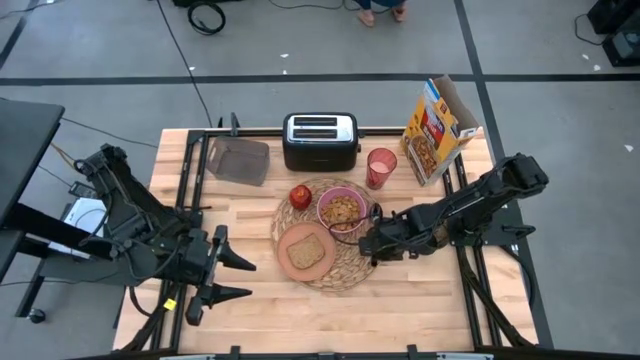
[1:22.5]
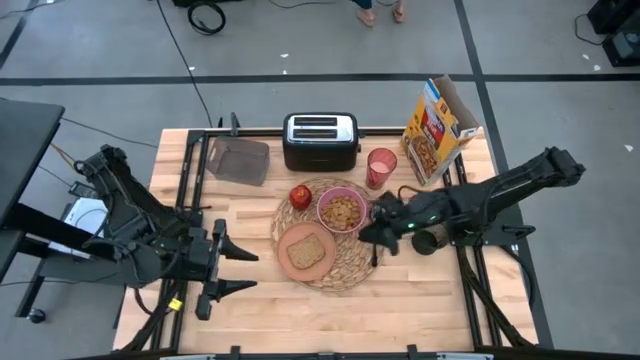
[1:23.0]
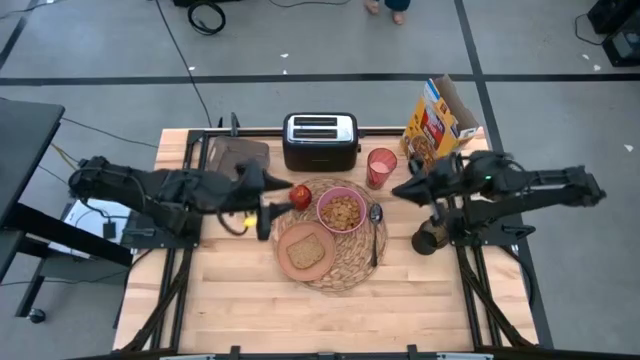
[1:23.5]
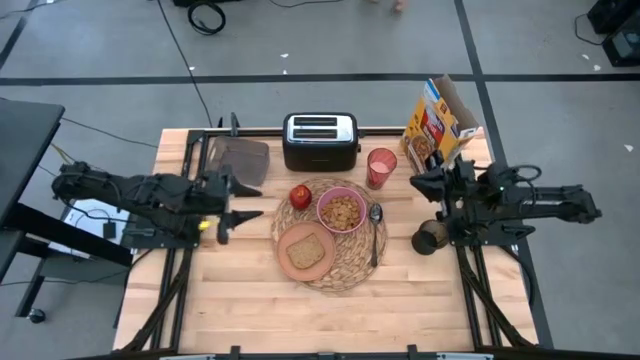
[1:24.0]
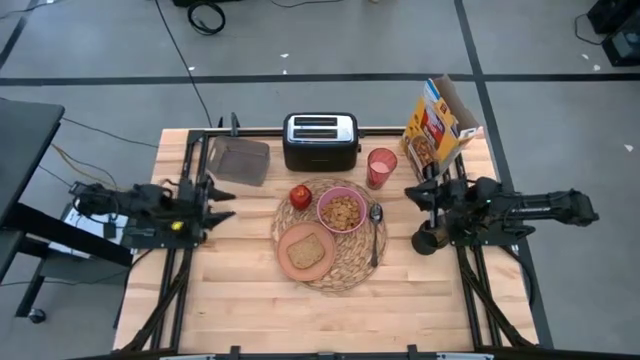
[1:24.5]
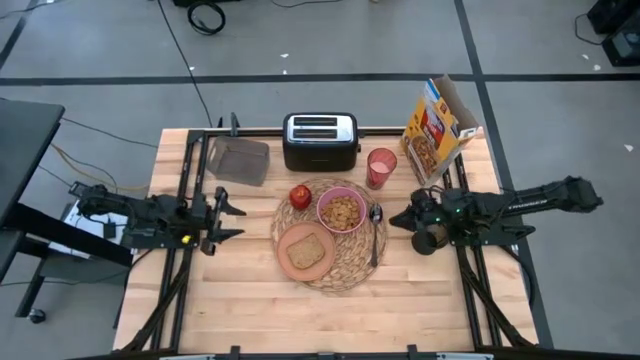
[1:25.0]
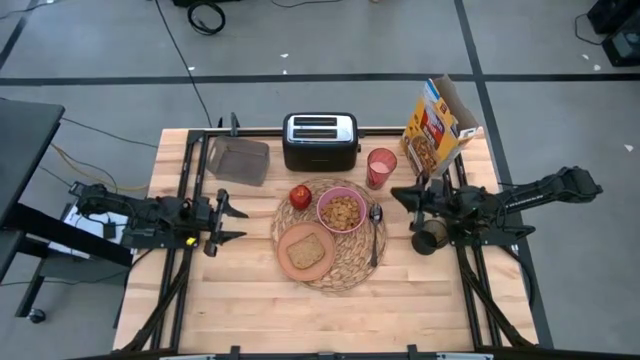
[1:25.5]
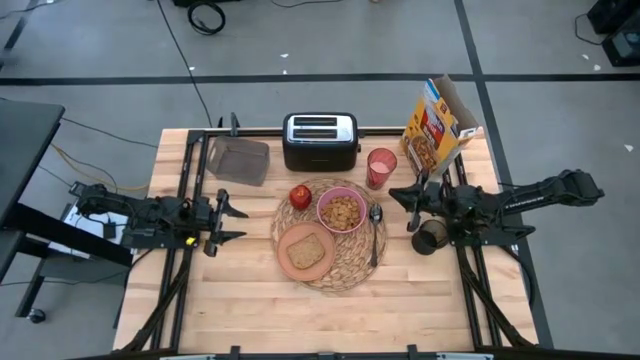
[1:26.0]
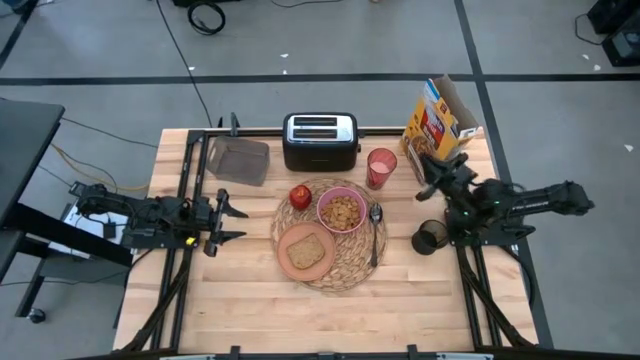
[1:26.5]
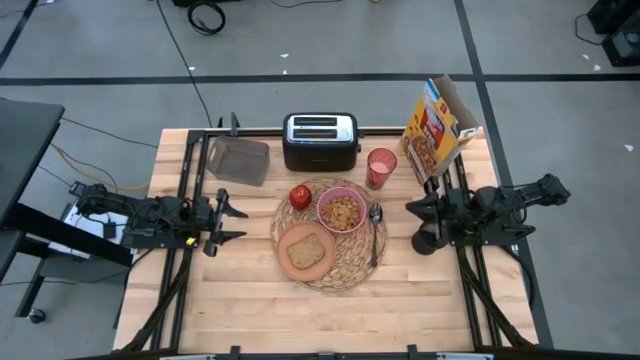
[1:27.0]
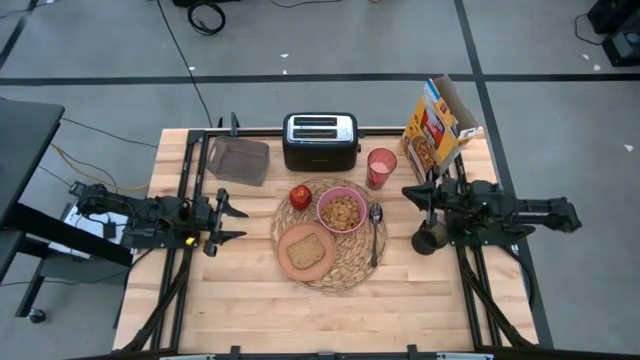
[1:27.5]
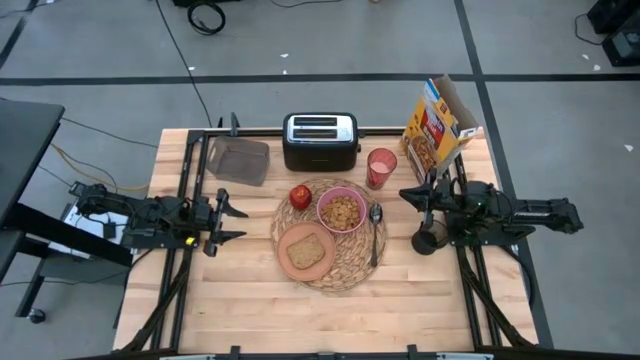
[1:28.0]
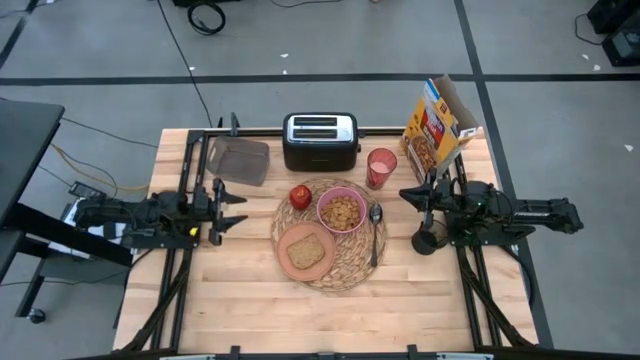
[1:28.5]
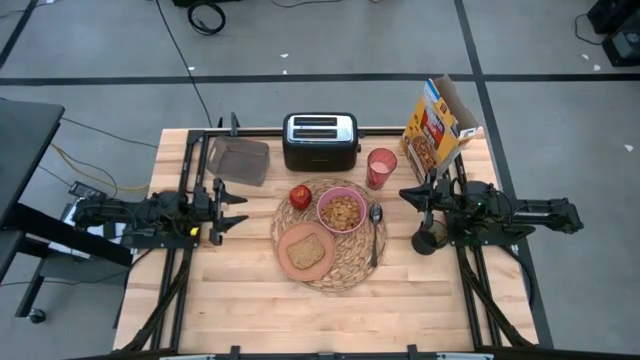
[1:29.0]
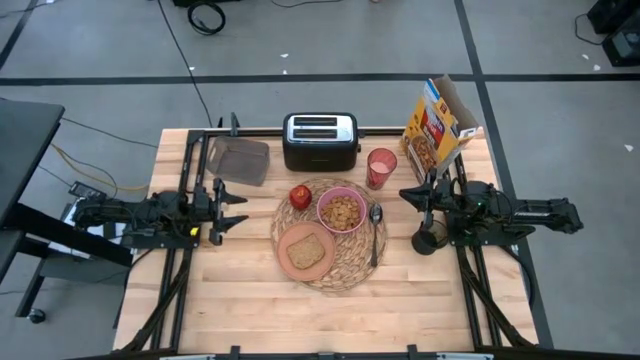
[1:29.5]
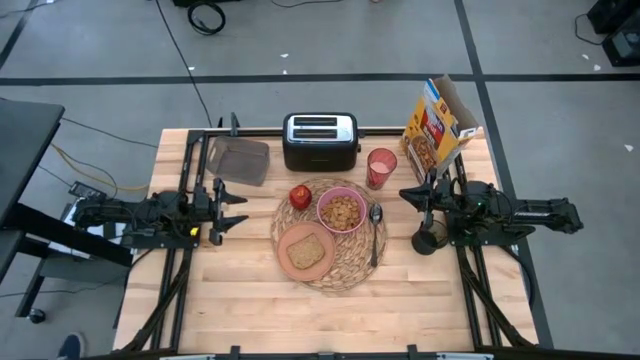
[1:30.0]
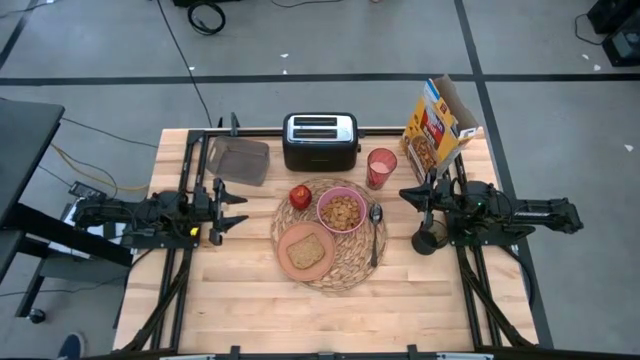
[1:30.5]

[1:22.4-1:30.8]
Task: Arrange a breakfast setting
Return to Home Position

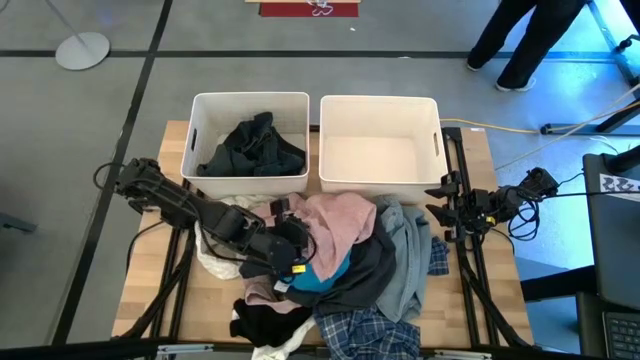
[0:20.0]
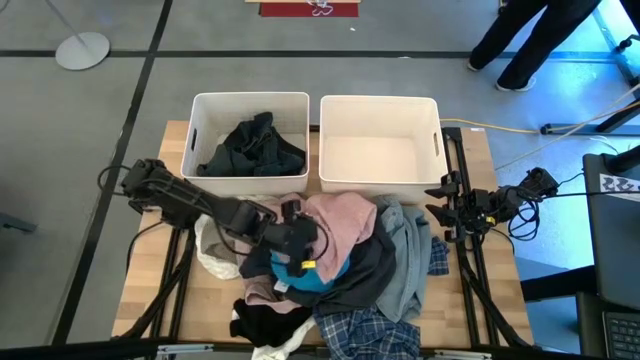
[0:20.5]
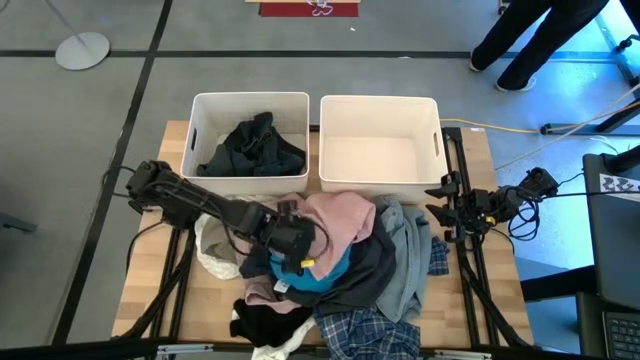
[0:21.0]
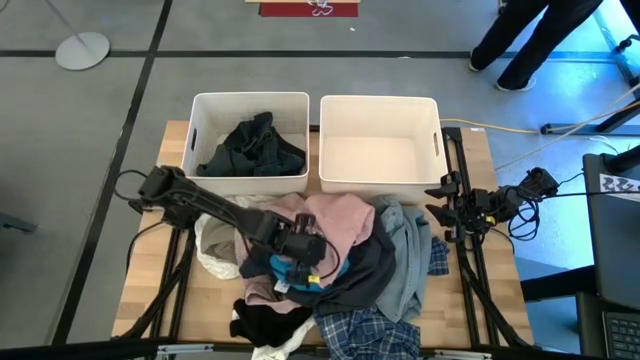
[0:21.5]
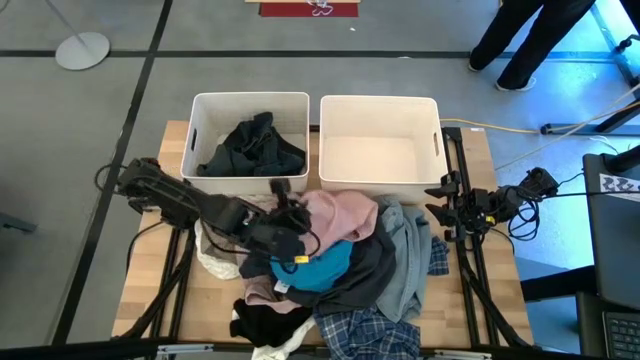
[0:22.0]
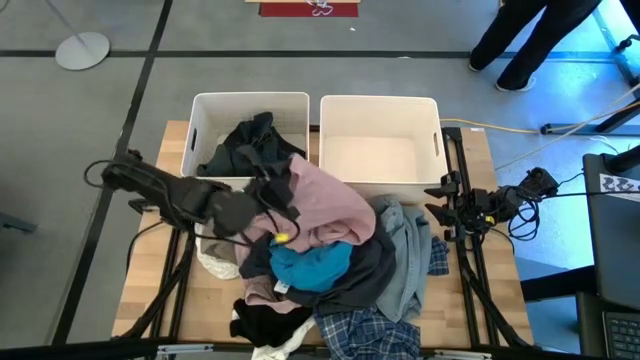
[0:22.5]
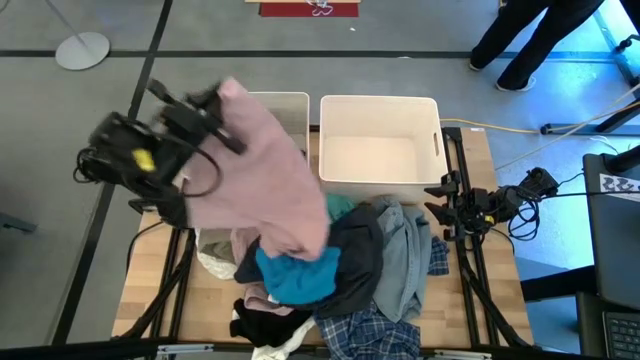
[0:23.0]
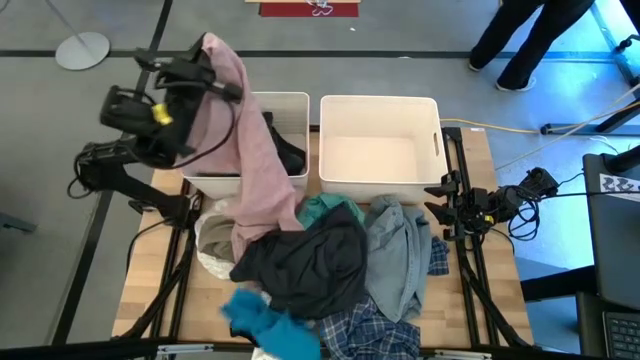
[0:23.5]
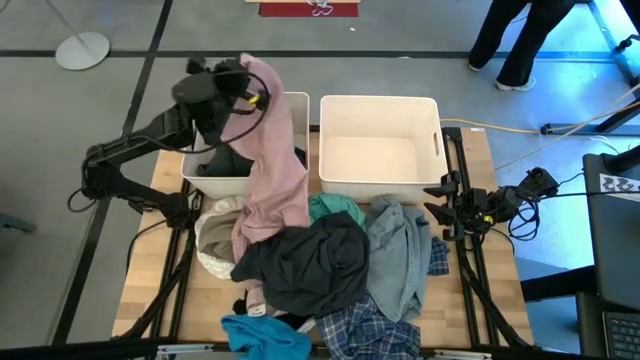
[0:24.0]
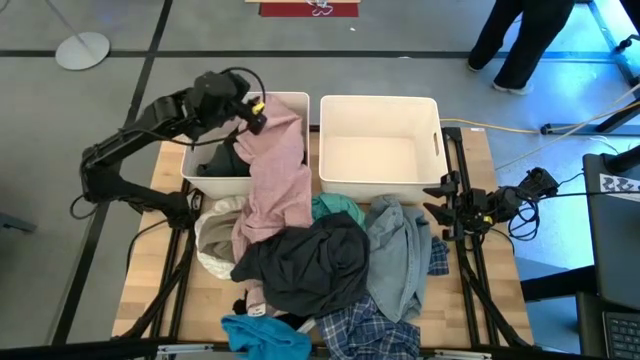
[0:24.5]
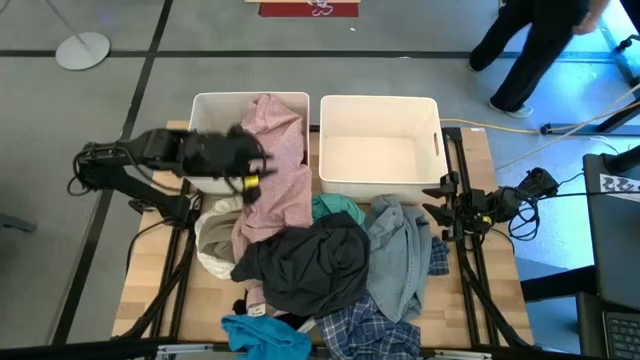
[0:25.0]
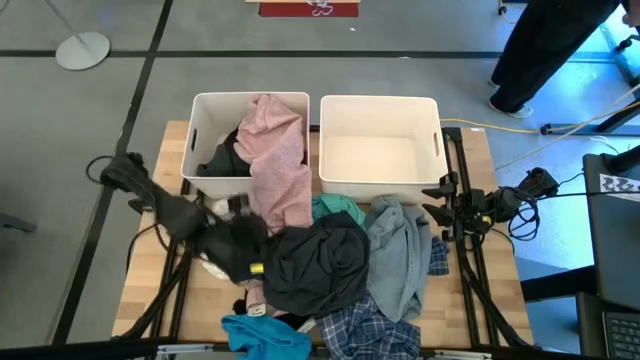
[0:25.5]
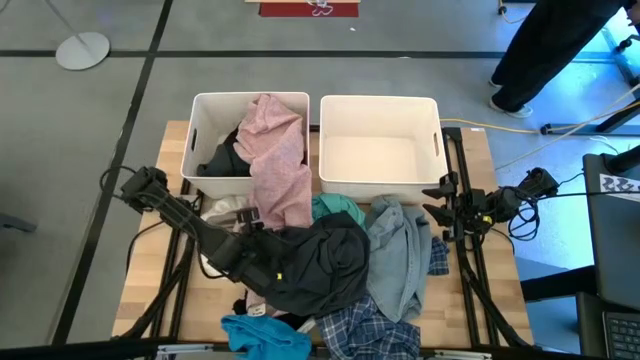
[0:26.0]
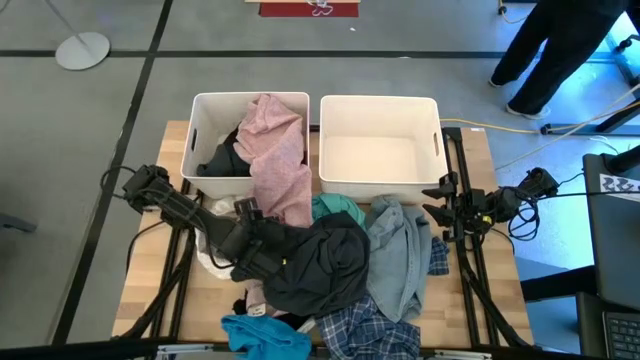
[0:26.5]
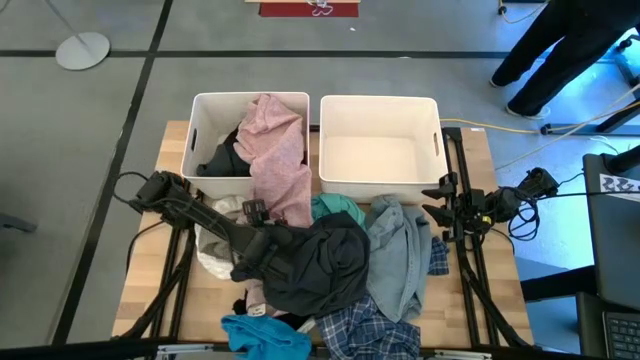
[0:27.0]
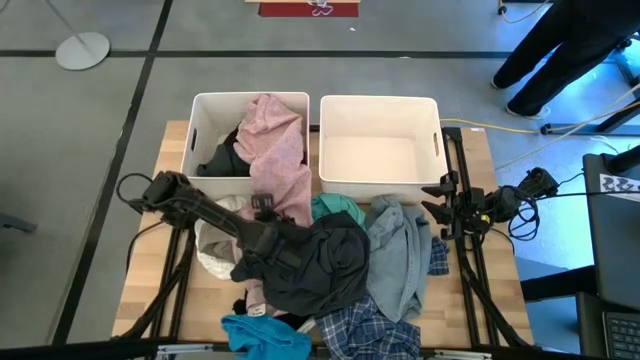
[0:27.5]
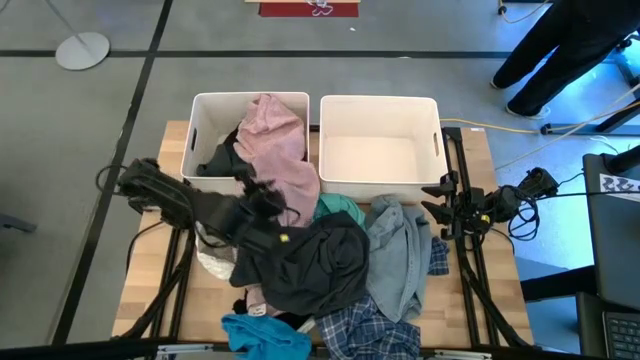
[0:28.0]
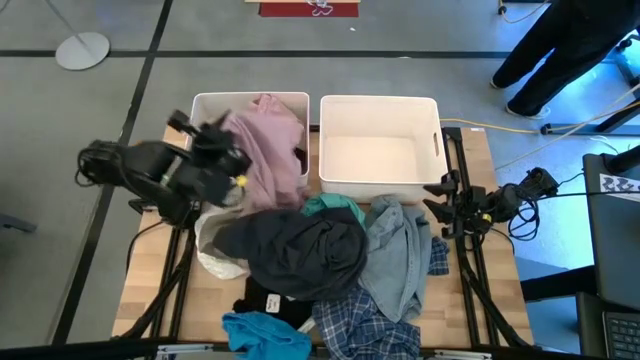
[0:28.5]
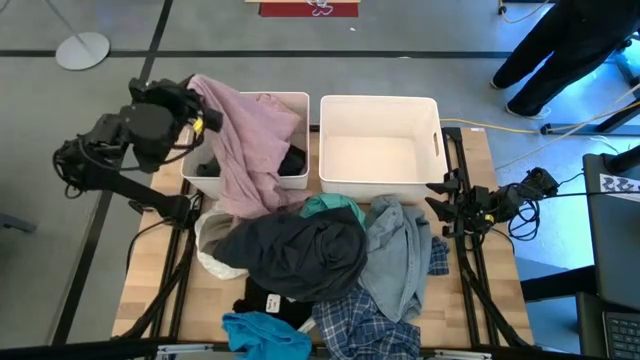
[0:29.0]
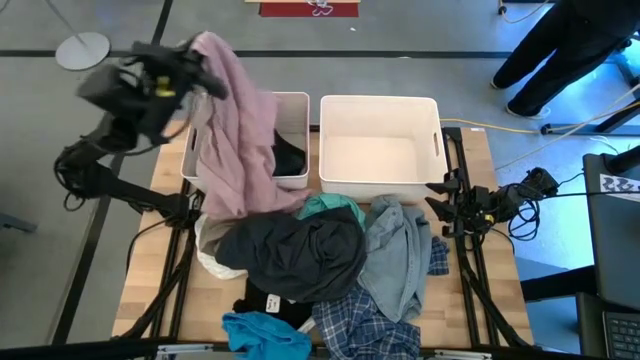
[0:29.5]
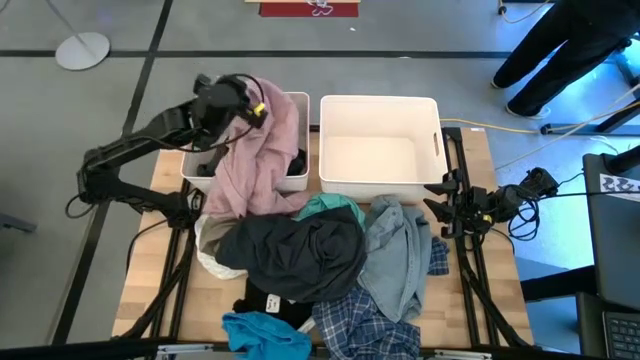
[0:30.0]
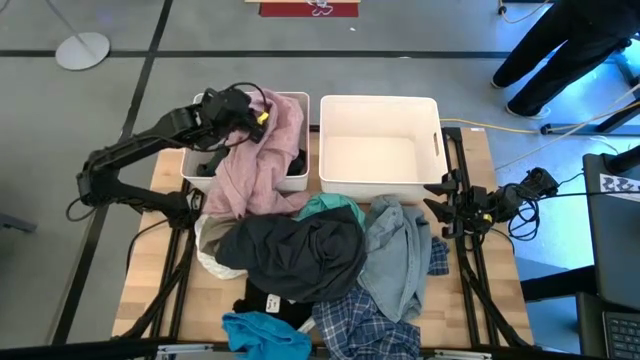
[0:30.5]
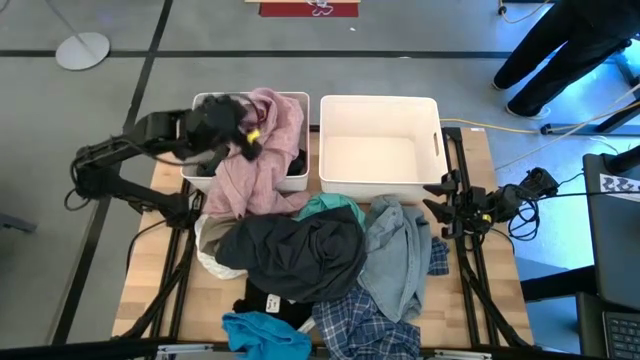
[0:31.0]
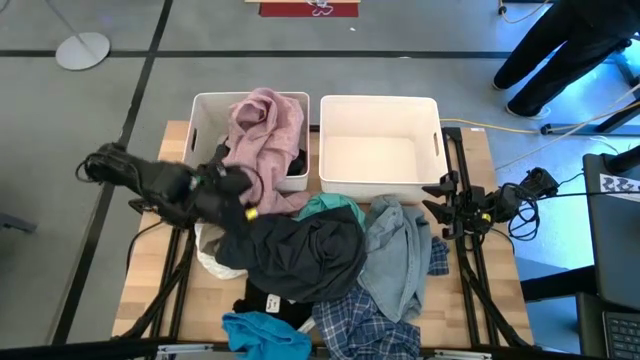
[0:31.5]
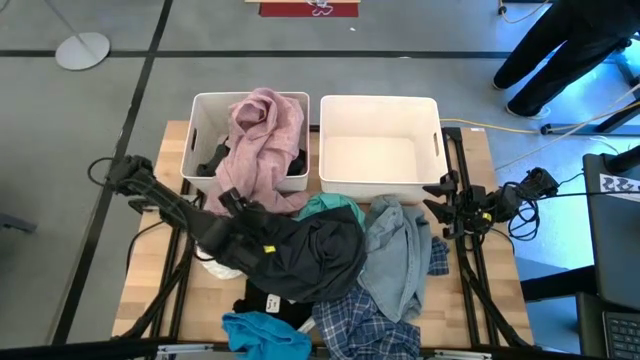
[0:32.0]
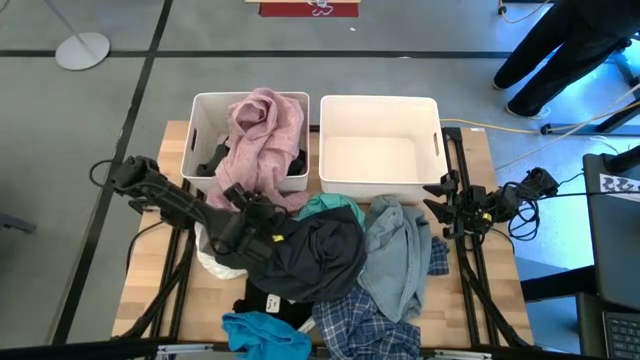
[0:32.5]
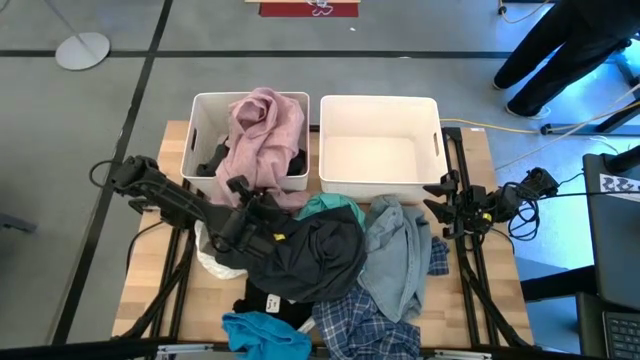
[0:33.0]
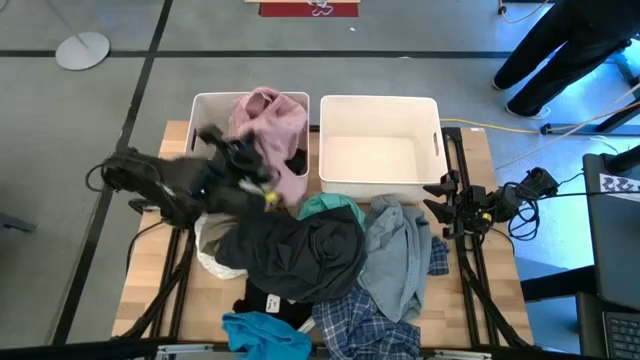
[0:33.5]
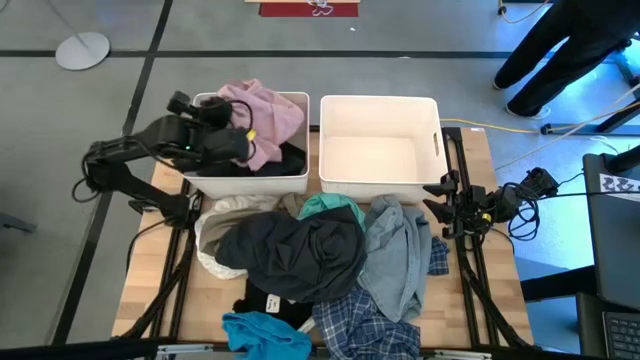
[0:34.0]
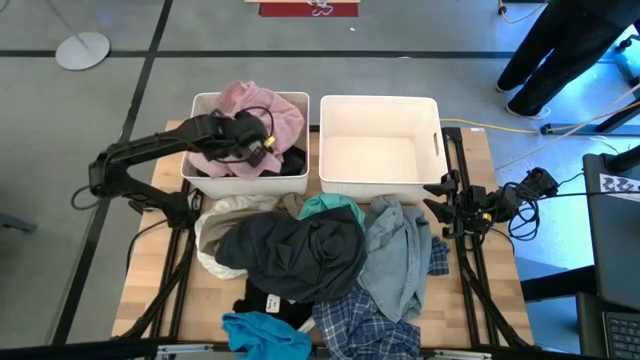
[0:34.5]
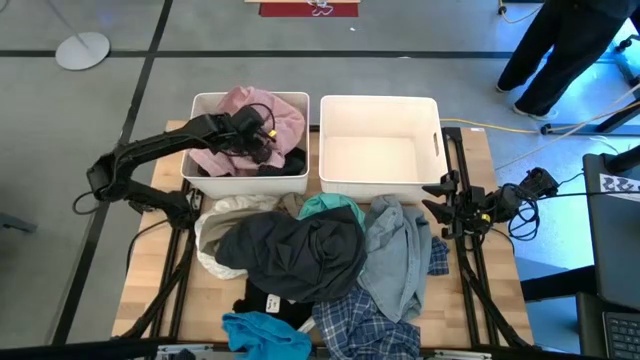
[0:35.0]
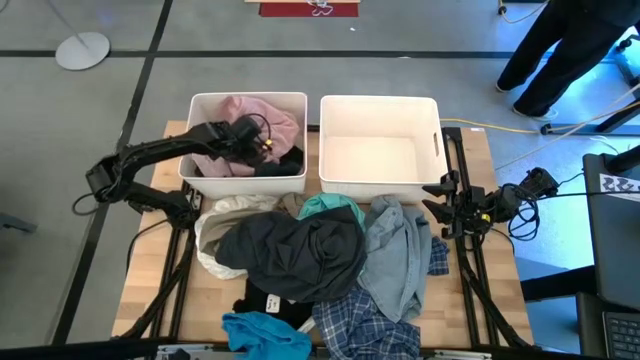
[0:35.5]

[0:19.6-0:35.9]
Task: Sort clothes
Put the pink shirt into the left white bin
